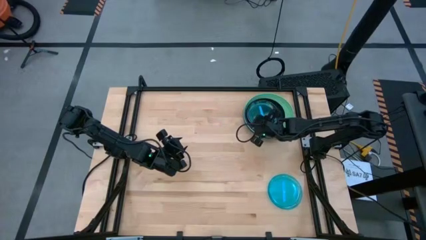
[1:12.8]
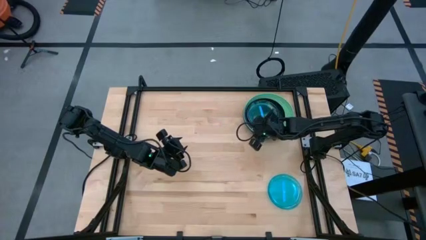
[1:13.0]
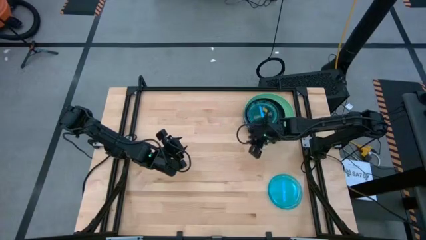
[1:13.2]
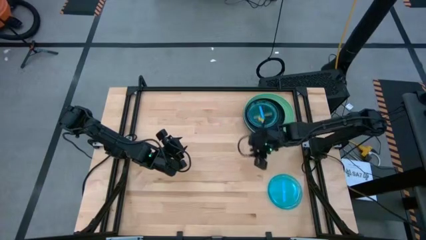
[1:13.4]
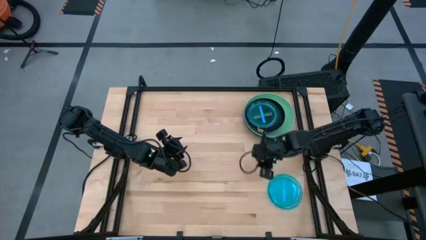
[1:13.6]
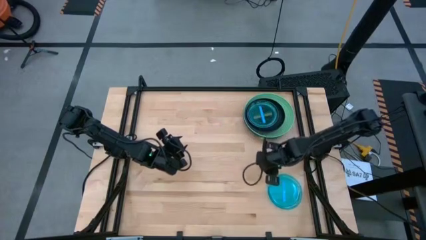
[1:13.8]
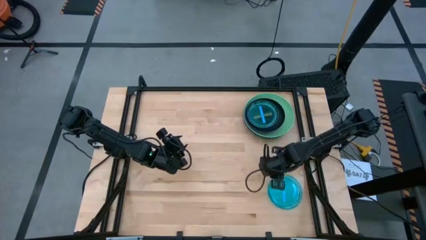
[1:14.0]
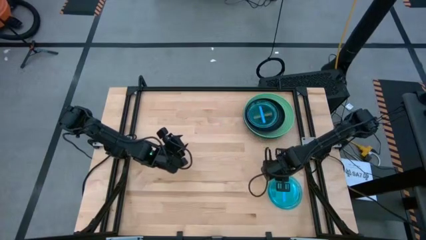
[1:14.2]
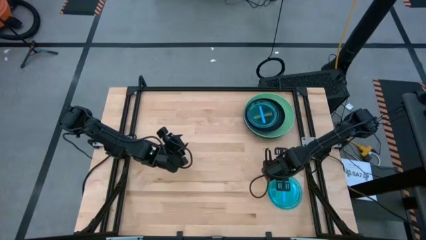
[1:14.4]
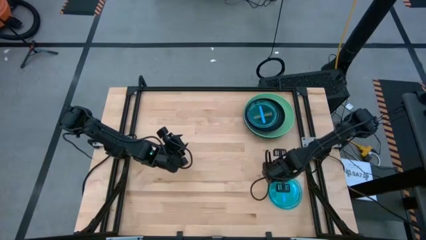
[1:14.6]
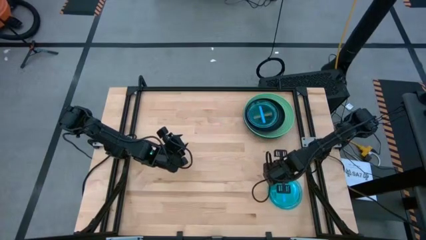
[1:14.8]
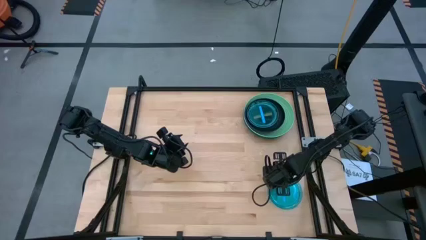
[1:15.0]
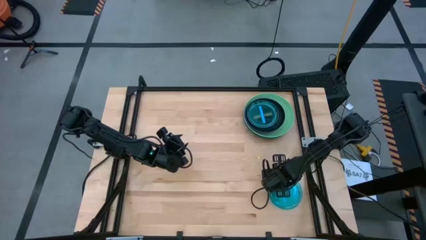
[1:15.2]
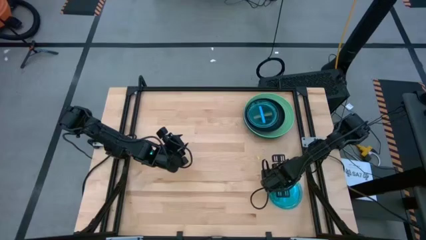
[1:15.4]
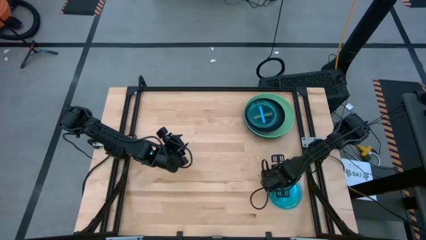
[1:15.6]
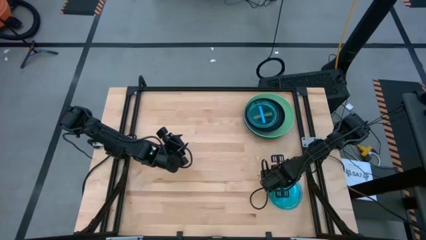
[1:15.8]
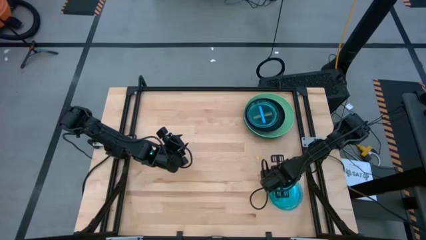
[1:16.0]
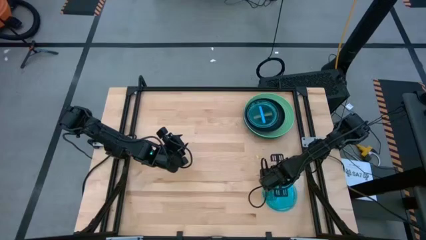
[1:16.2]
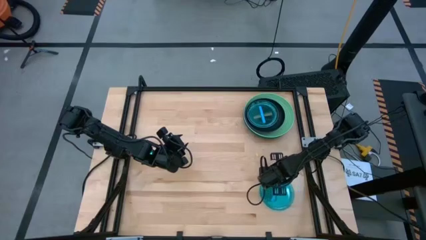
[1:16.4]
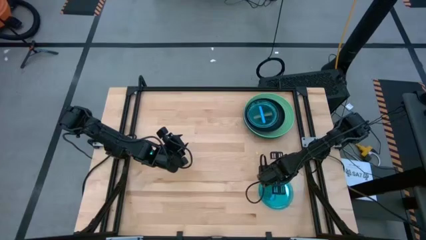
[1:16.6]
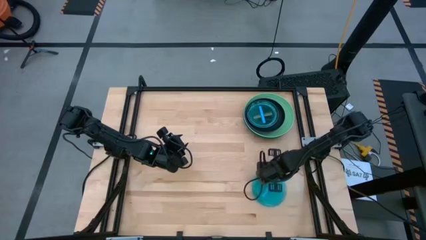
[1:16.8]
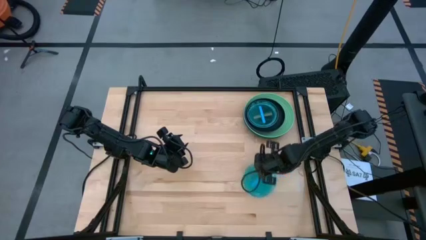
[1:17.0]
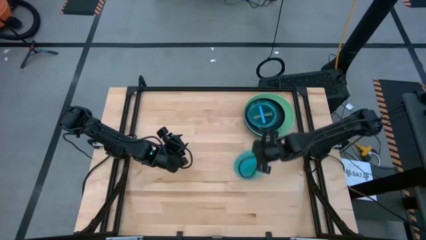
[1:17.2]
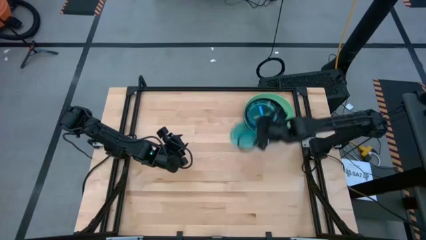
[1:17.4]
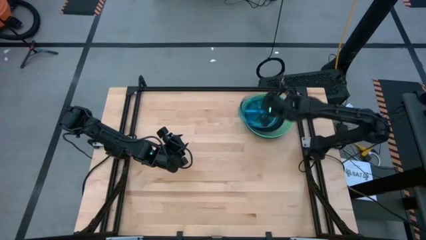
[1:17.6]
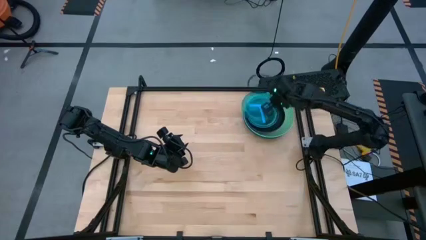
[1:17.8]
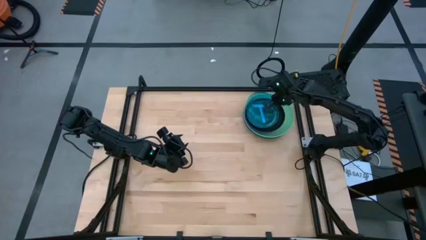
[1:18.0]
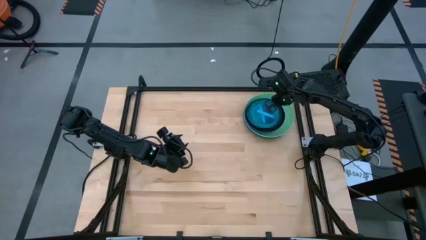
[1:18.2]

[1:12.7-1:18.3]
Task: Stack plastic plates
Stack the transparent blue plate on the transparent blue plate

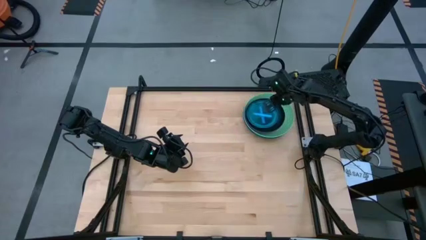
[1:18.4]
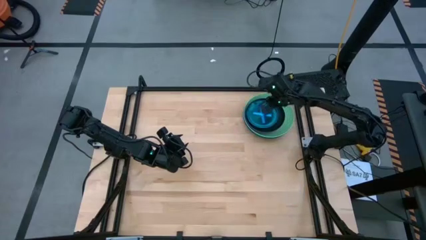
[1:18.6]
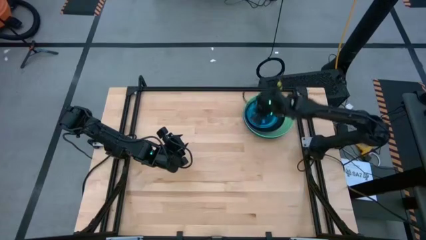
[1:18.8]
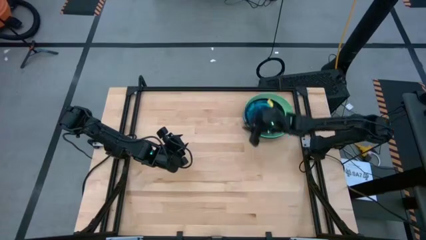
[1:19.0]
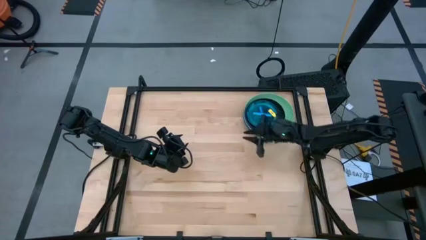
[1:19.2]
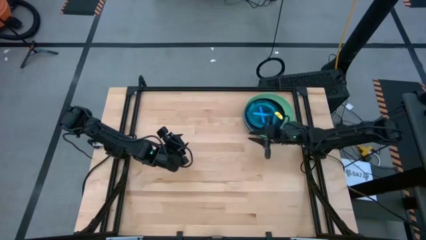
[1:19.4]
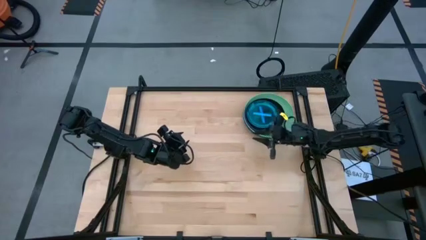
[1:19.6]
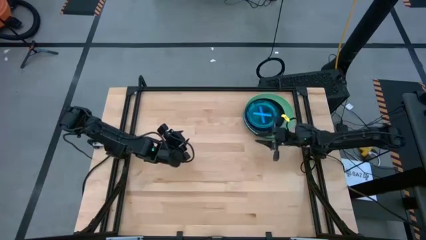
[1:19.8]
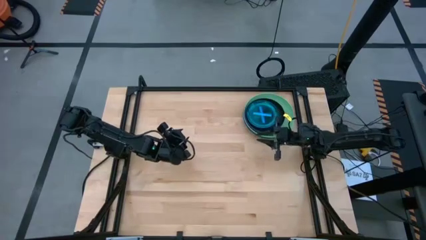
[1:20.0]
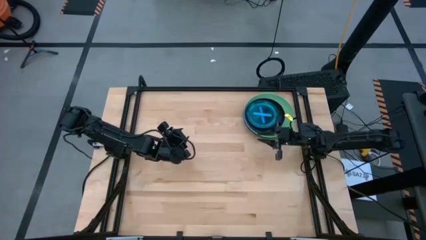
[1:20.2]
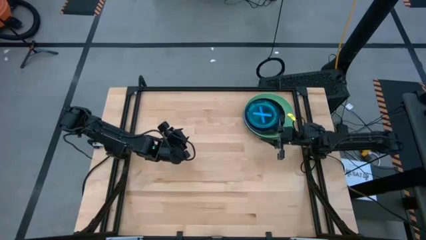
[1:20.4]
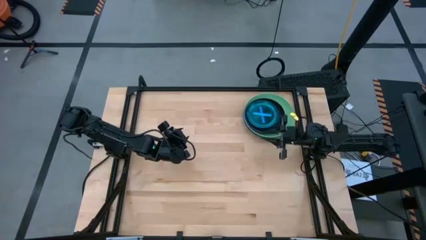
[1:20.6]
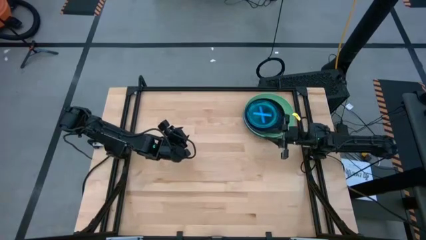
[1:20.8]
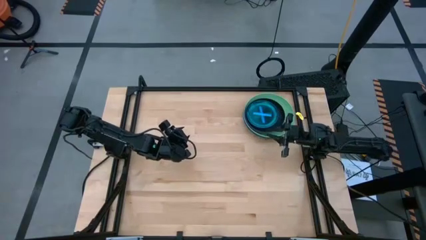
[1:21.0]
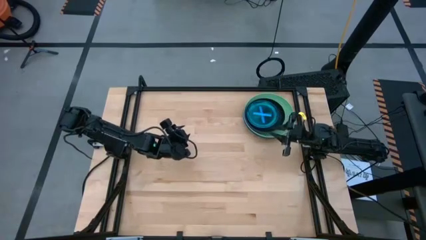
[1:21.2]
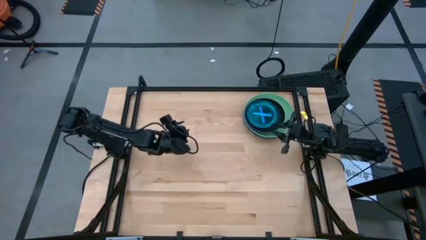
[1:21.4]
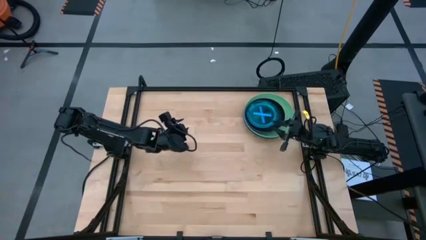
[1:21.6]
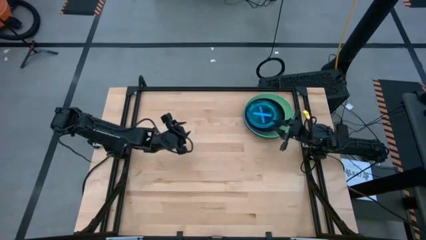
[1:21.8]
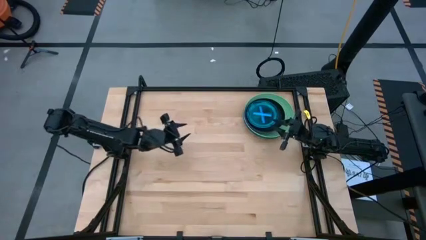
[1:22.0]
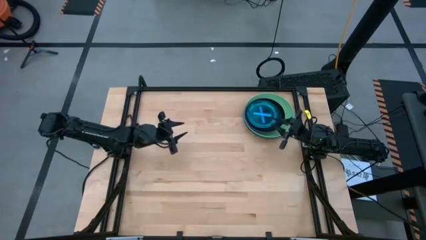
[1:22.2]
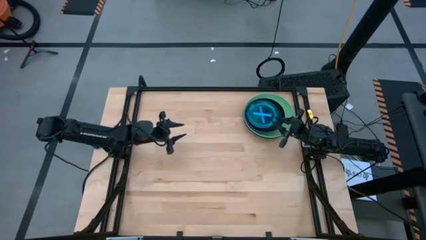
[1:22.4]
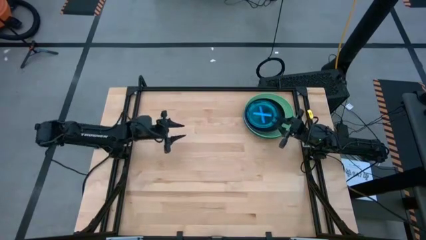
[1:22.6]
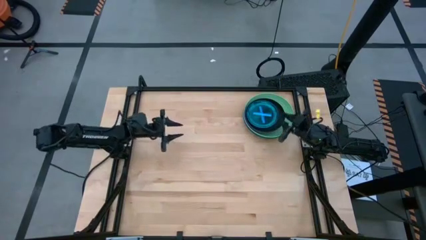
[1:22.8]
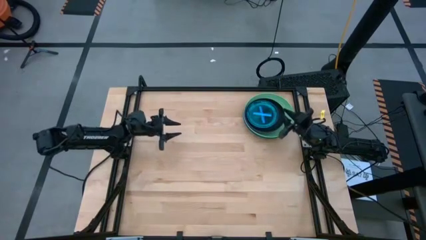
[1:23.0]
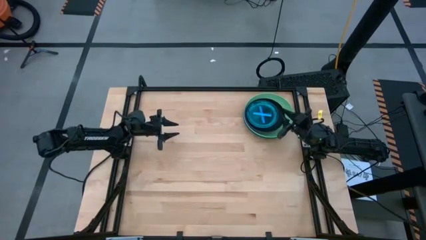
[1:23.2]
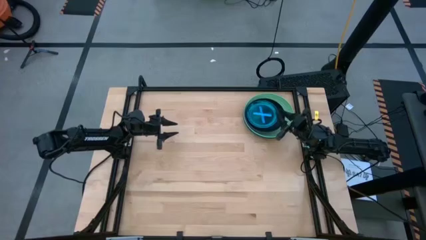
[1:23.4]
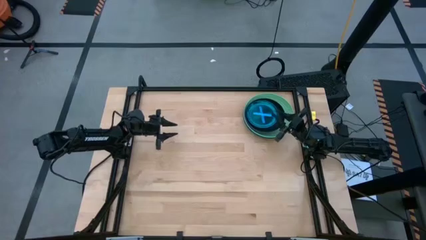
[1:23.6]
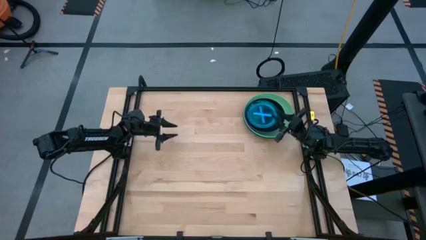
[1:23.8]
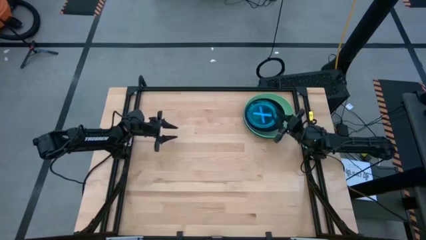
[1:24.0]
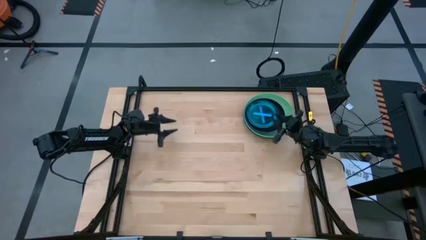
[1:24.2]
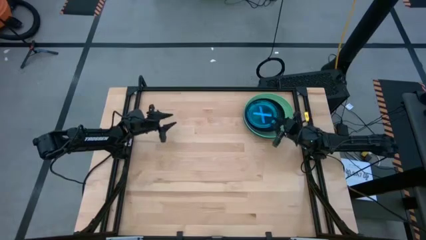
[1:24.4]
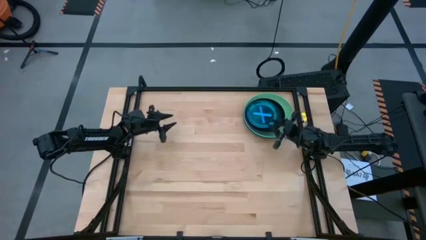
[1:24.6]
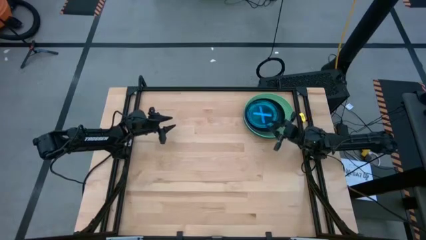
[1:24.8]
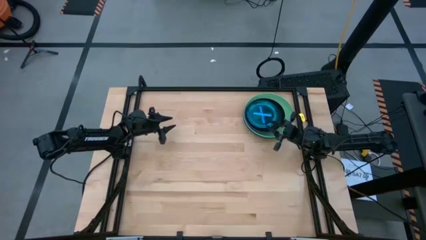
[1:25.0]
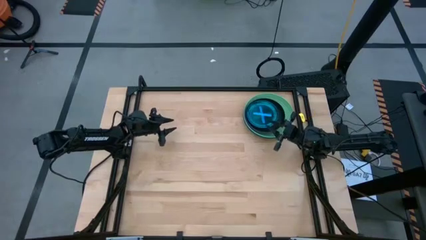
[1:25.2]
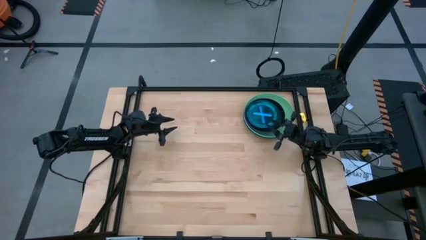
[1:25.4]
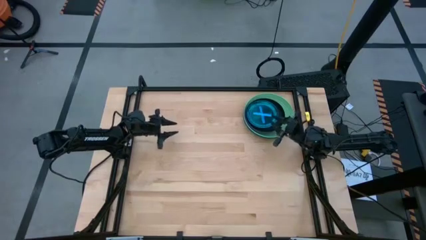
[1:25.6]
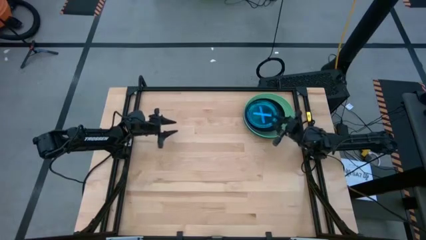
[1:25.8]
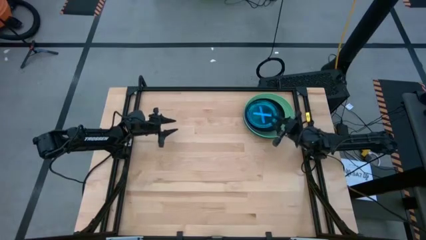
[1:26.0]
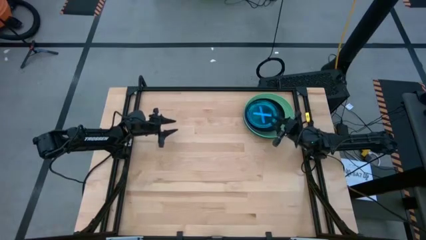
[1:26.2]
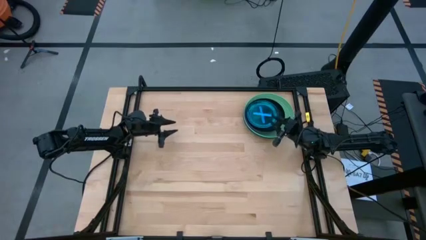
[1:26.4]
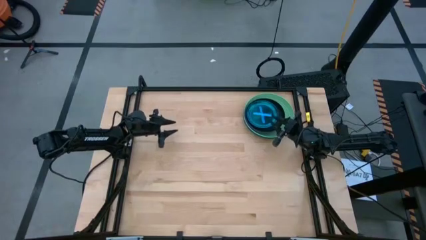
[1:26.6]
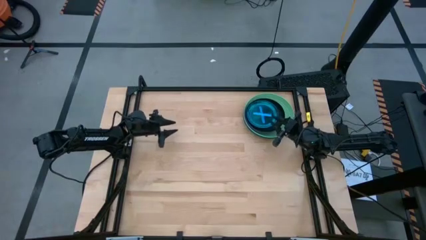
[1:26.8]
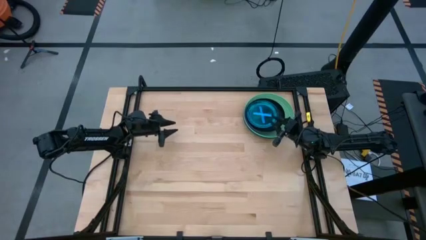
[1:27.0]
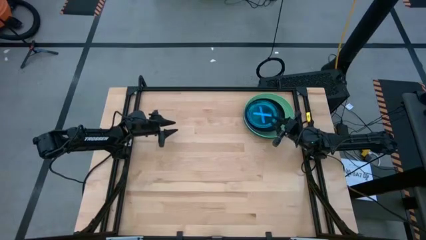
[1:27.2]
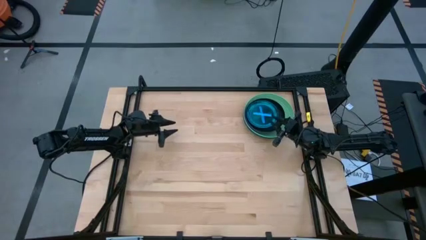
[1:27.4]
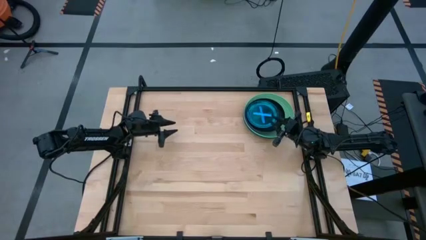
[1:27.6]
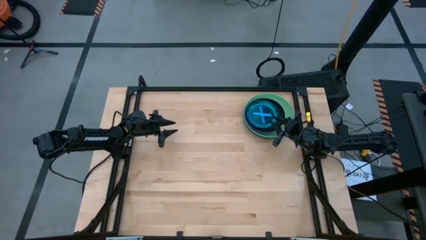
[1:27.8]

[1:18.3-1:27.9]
Return to Home Position
